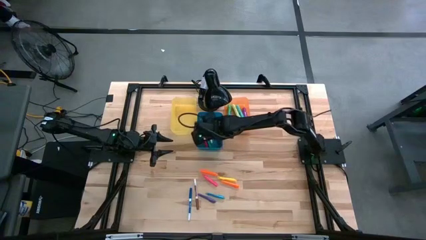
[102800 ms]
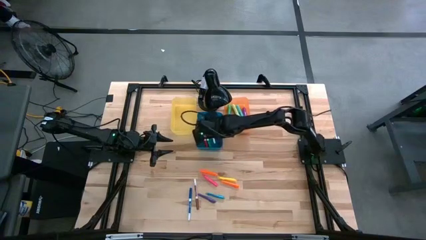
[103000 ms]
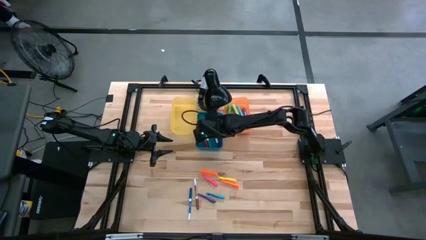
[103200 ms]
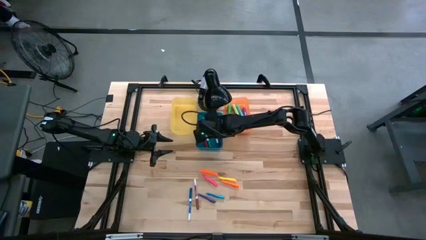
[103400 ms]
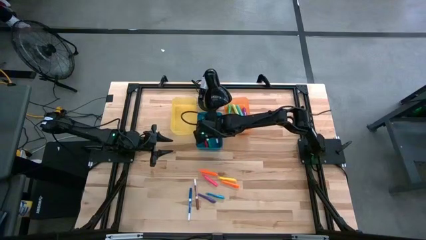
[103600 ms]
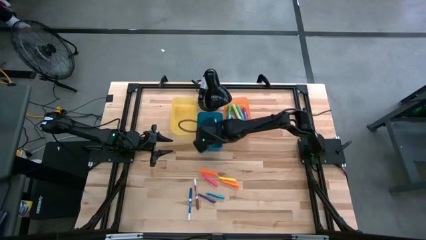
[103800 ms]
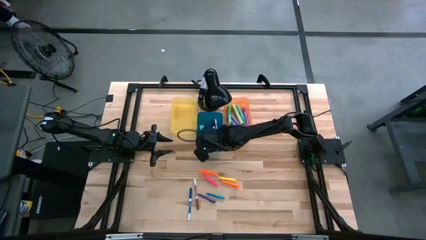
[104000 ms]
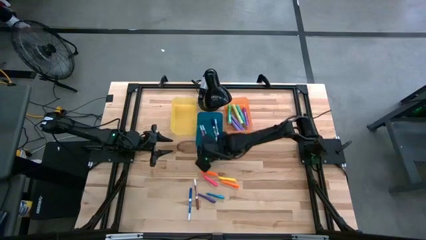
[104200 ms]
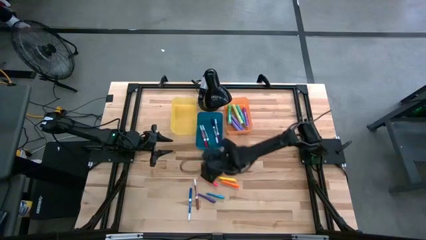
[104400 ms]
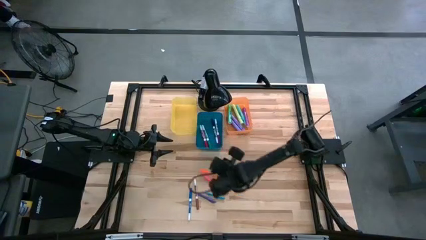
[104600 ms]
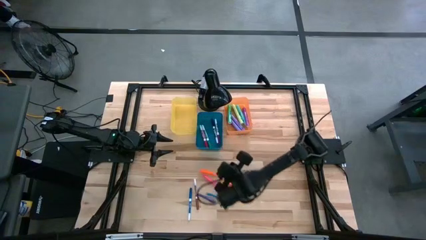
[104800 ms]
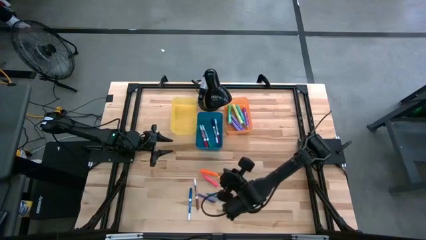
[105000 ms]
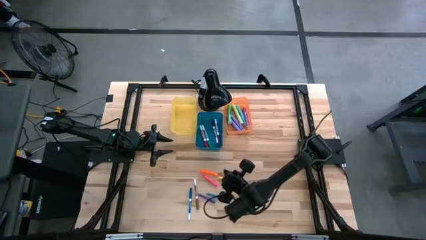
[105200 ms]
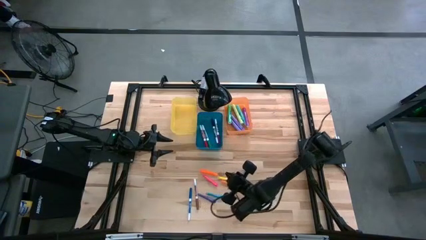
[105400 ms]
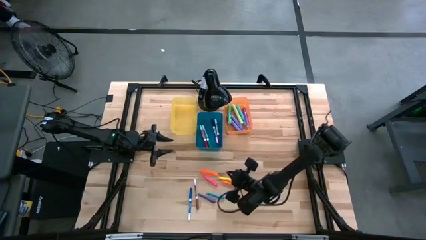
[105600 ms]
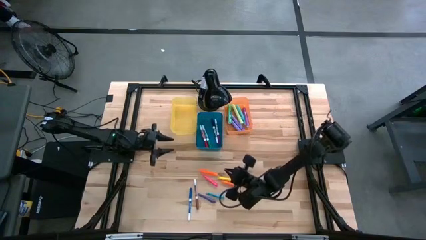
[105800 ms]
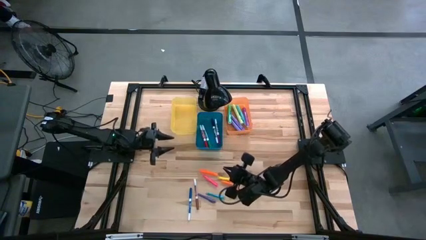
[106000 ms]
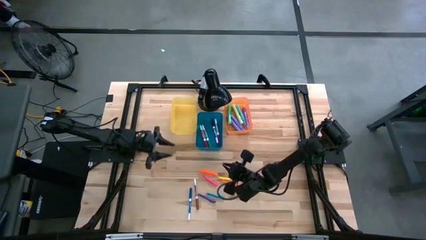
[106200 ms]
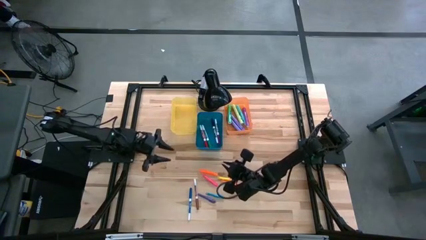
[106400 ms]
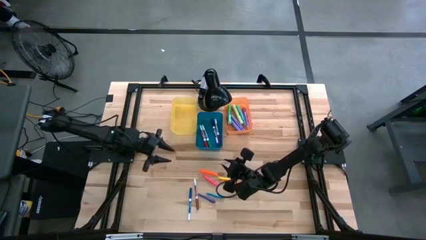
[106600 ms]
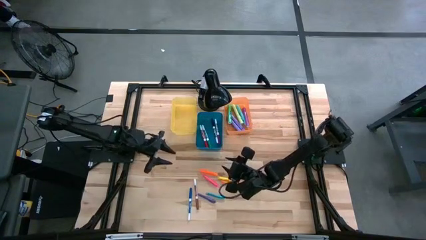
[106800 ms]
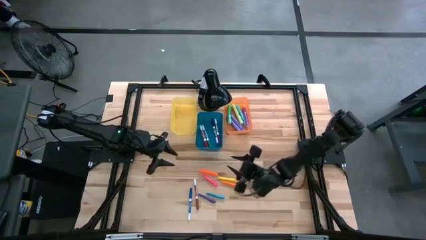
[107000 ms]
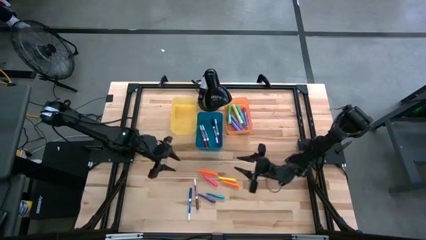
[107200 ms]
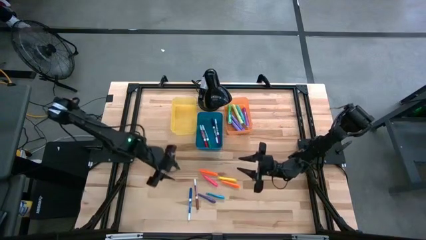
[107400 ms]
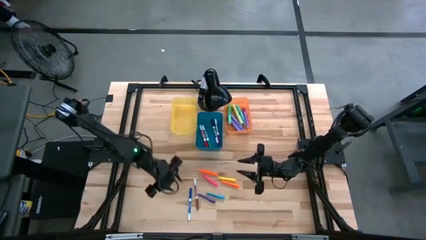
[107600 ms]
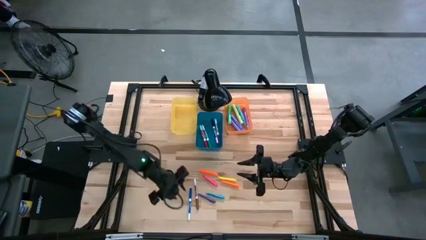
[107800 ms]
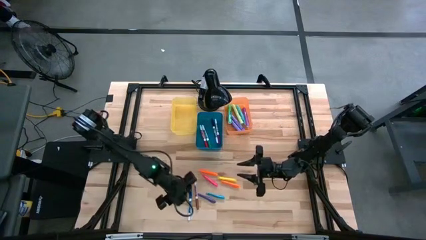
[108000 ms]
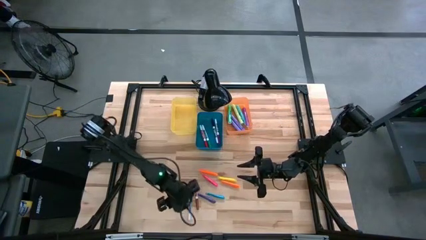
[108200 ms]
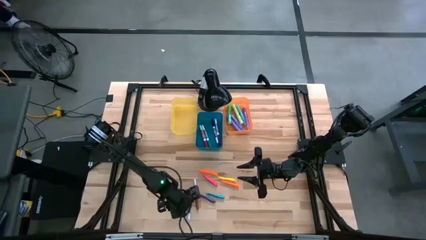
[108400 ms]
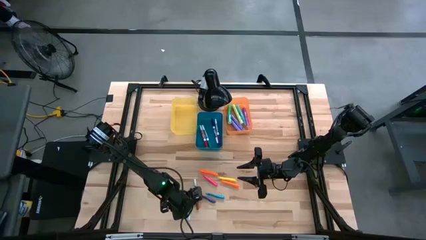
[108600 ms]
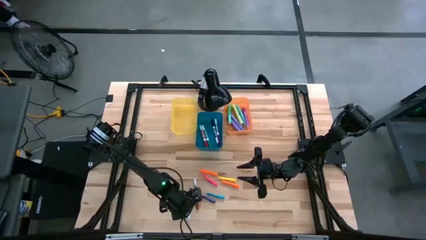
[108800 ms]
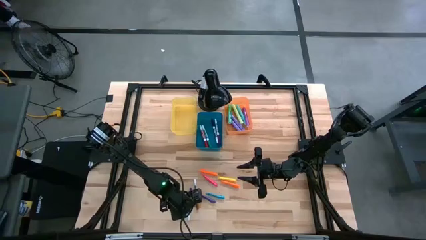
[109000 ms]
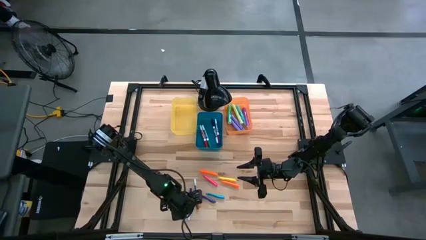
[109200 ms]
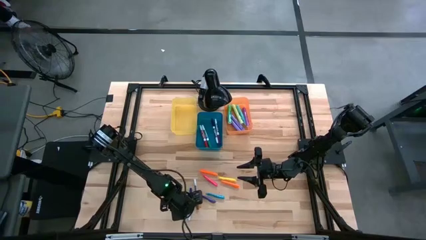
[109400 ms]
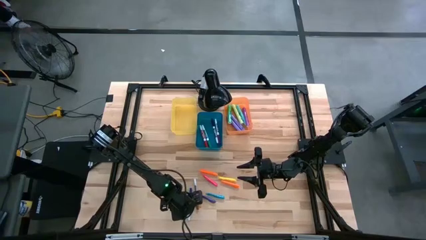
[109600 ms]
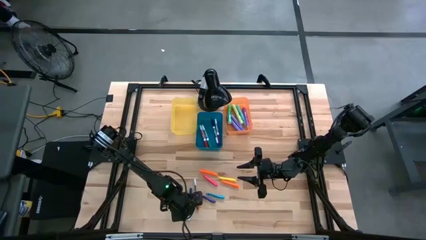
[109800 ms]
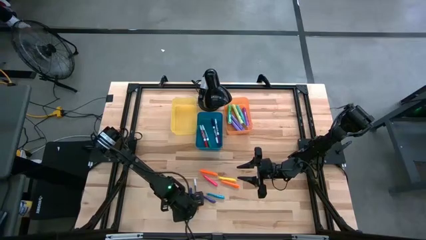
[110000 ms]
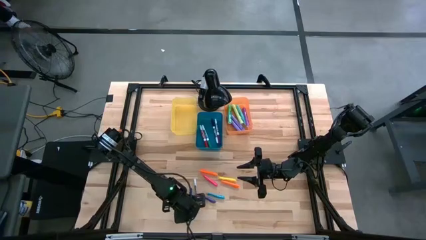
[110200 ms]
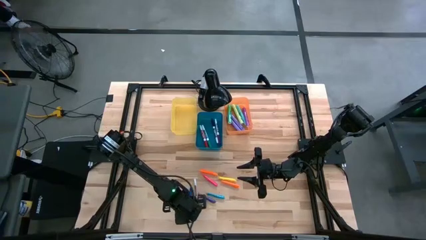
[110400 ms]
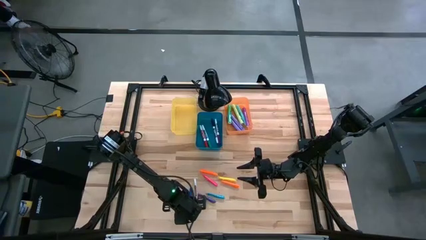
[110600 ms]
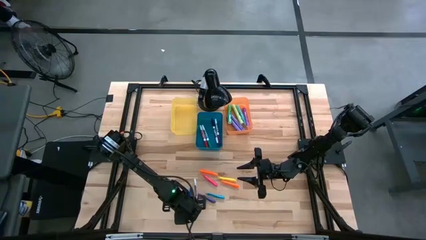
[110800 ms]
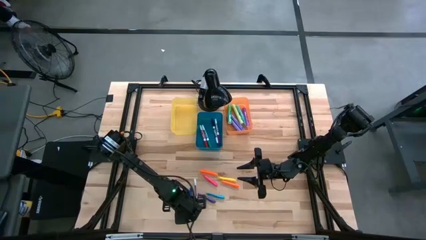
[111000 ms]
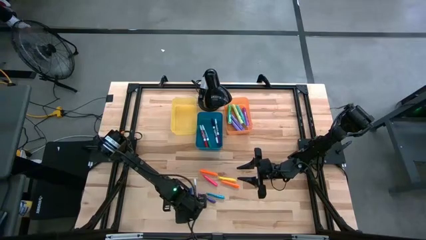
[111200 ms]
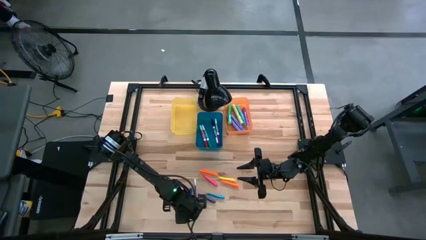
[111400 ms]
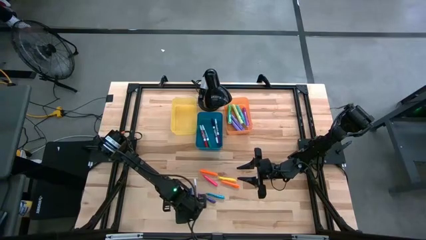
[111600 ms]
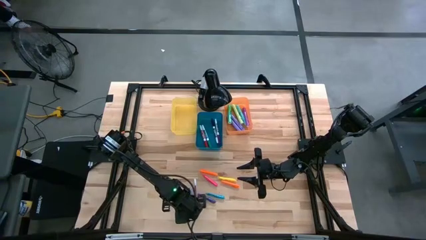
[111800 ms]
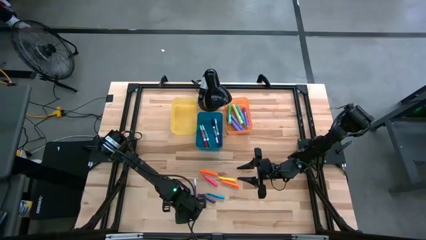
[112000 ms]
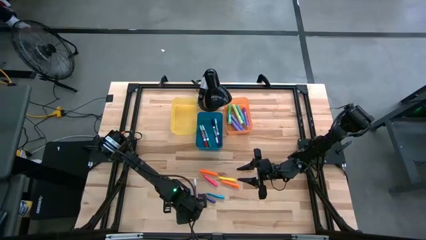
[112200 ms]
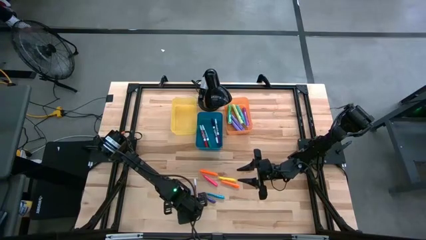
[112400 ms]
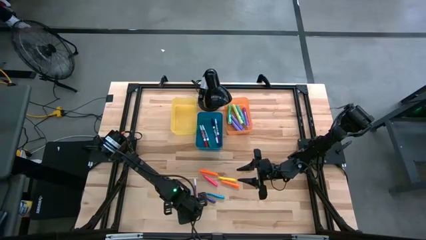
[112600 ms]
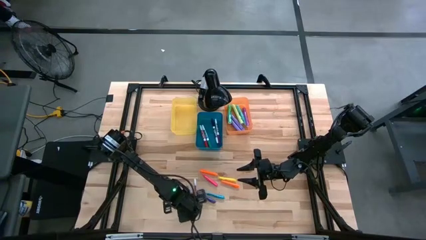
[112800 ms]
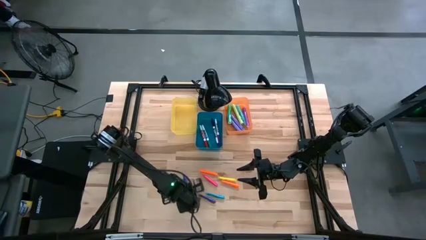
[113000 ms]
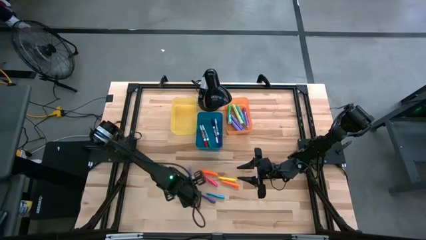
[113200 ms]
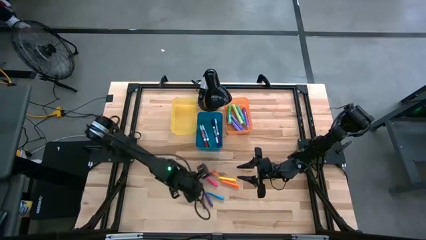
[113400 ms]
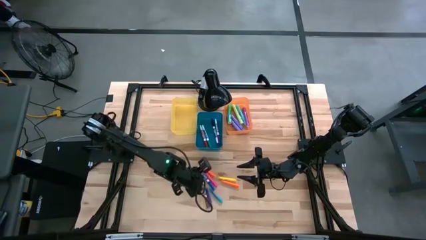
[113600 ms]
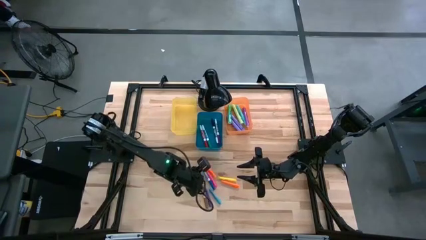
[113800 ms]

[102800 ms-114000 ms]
Task: Pick & Place Markers
Put the blue dry erase marker into the blue bin

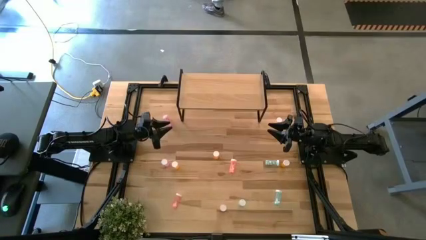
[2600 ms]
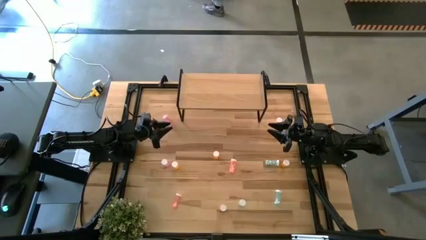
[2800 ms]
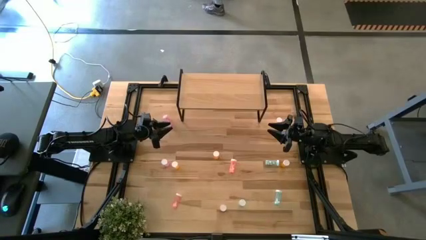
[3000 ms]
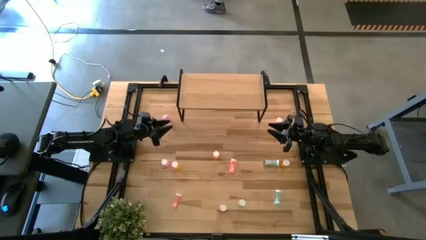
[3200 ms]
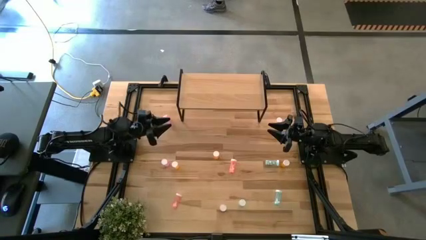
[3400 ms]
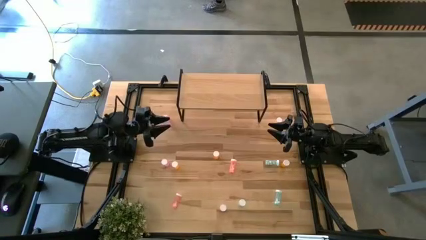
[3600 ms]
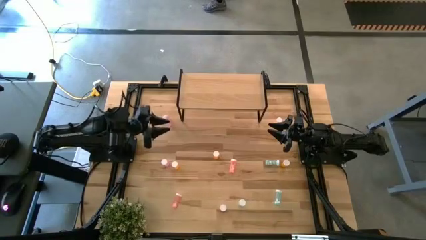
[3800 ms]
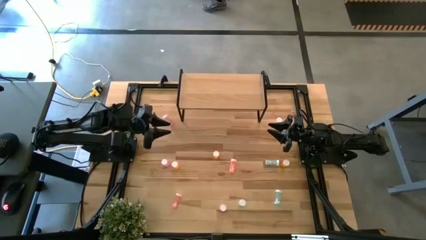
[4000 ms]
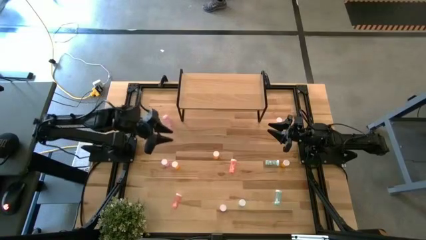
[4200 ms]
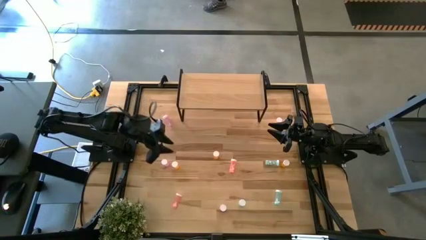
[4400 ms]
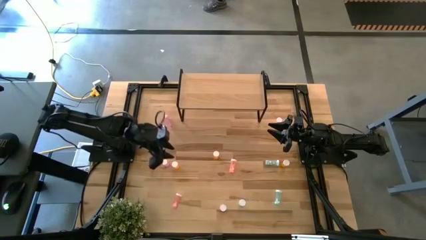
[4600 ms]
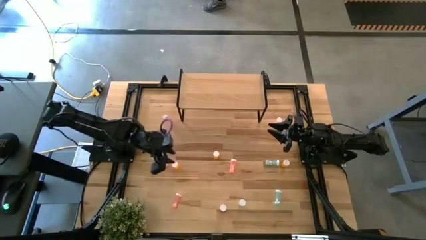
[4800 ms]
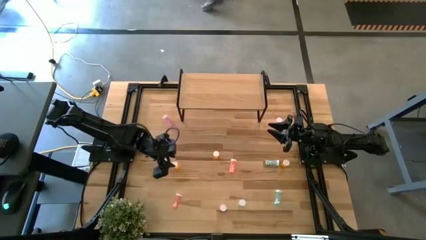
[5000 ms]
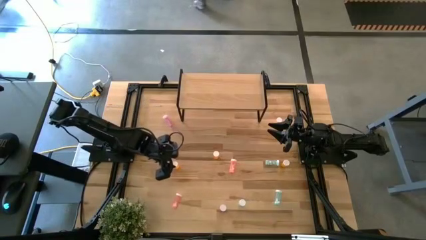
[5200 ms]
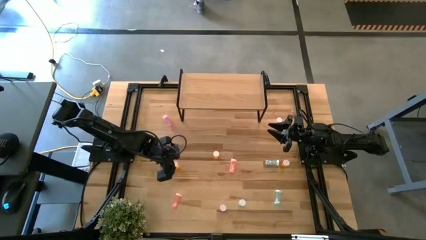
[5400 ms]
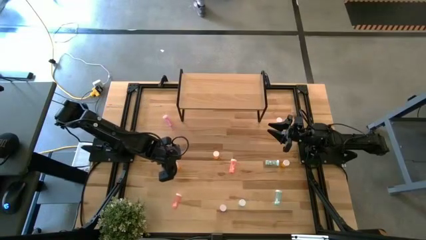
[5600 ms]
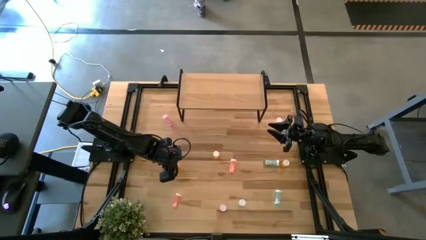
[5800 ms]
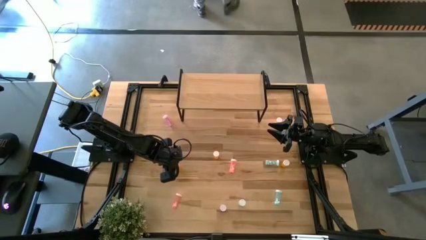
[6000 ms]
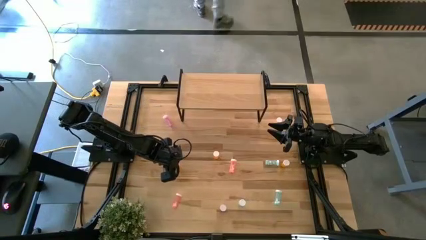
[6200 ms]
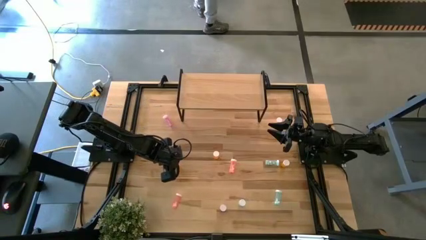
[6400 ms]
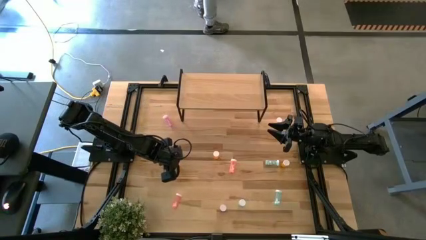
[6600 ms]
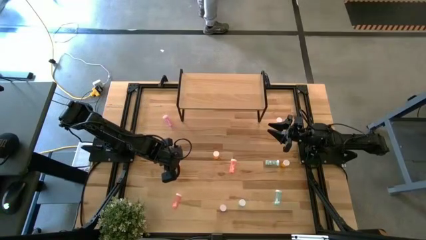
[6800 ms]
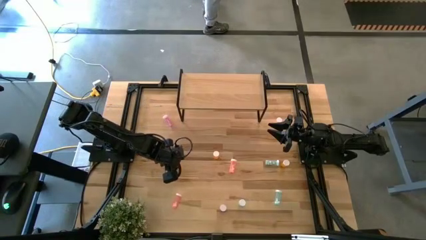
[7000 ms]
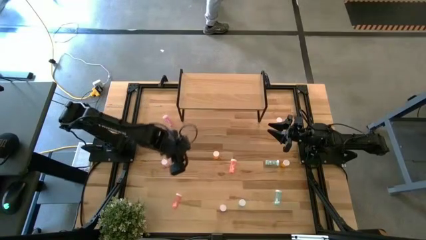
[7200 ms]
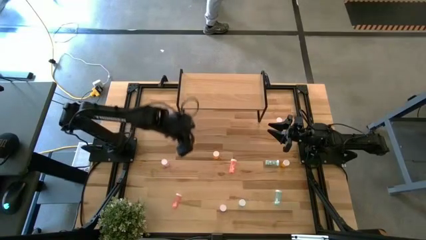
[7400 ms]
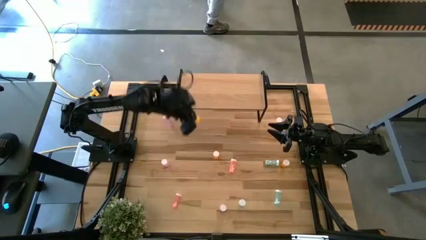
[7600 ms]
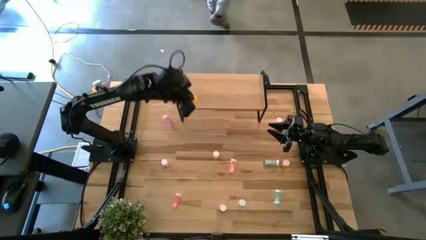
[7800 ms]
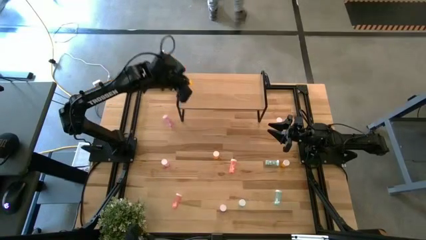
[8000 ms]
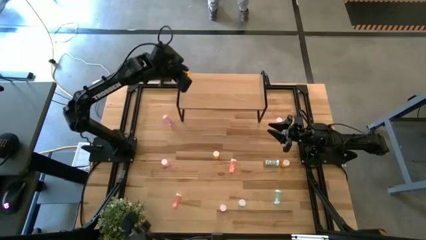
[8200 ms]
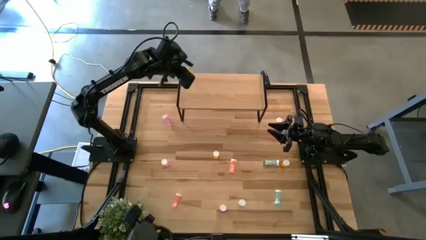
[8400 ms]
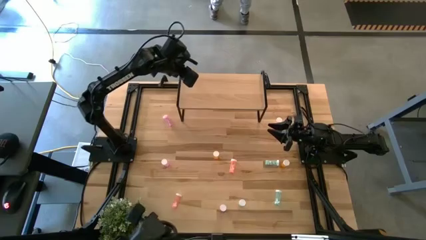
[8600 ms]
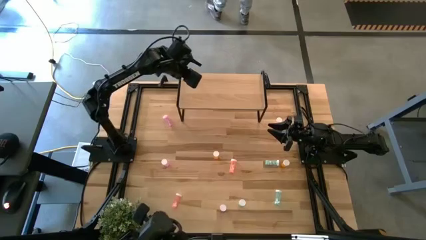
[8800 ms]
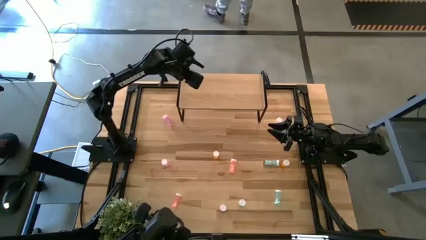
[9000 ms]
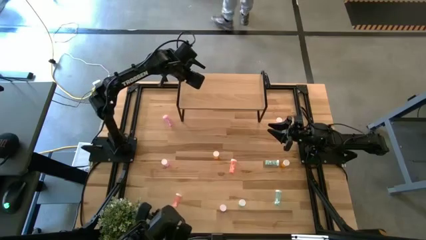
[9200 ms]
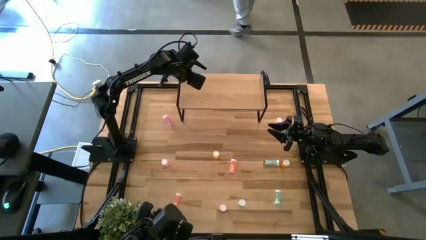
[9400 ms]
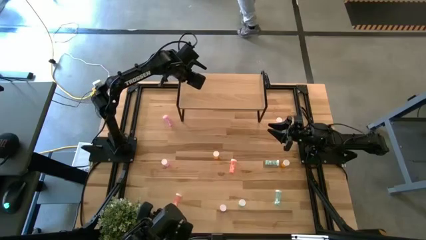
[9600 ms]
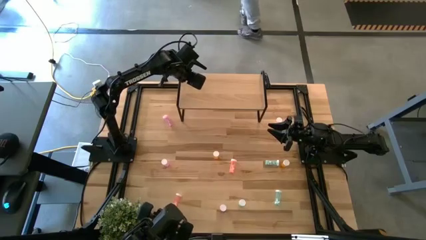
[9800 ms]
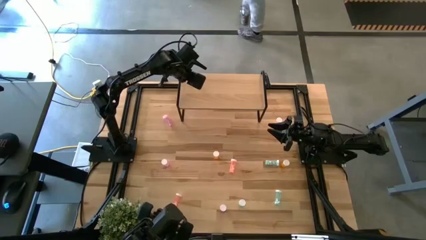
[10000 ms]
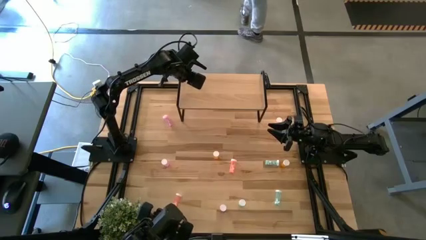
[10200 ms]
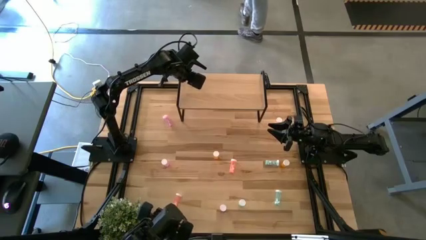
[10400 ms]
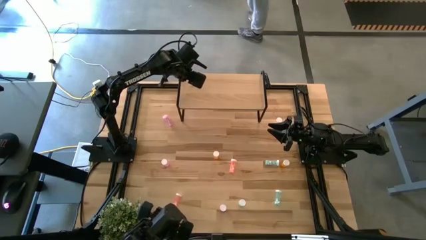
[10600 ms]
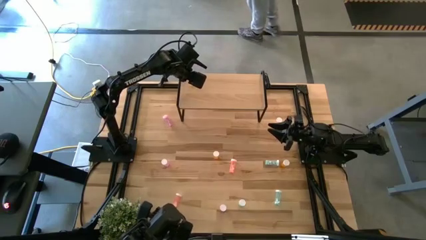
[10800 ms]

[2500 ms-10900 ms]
Task: Pick and place medicine bottles onto shelf by color
Put the bottom left orange medicine bottle on the shelf
